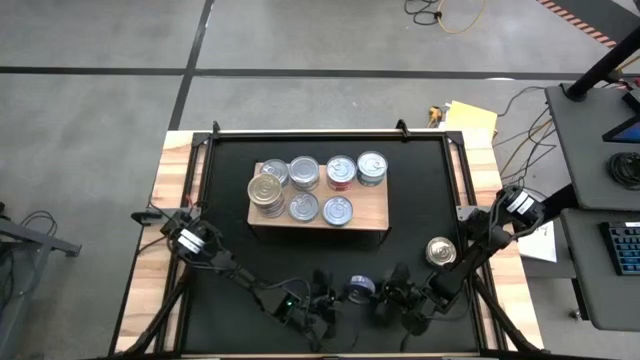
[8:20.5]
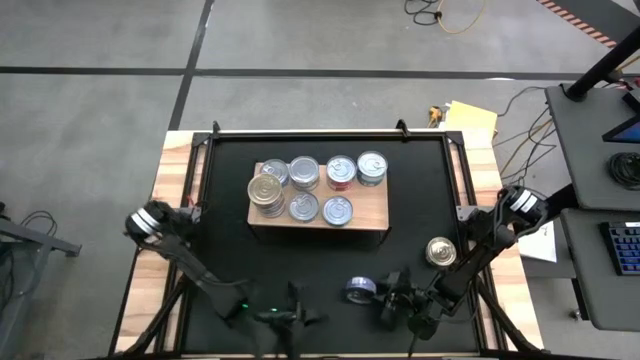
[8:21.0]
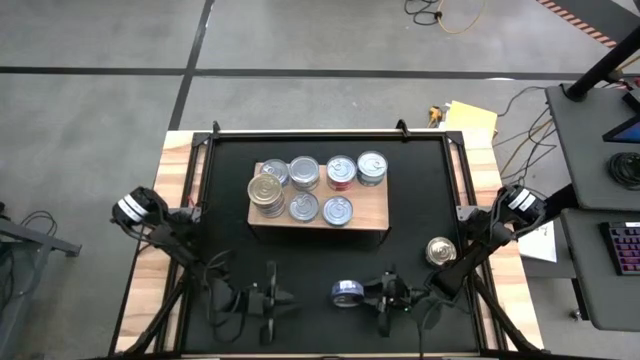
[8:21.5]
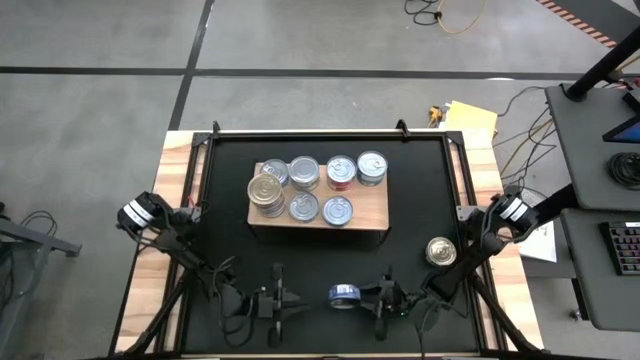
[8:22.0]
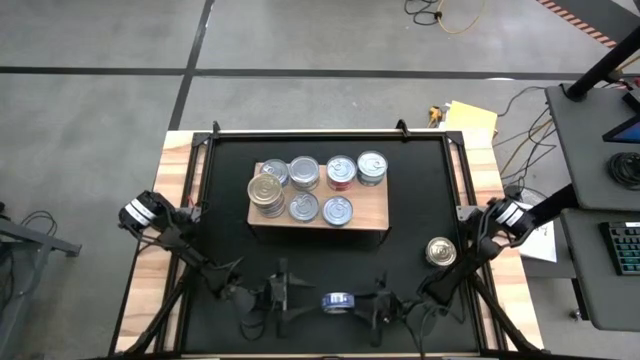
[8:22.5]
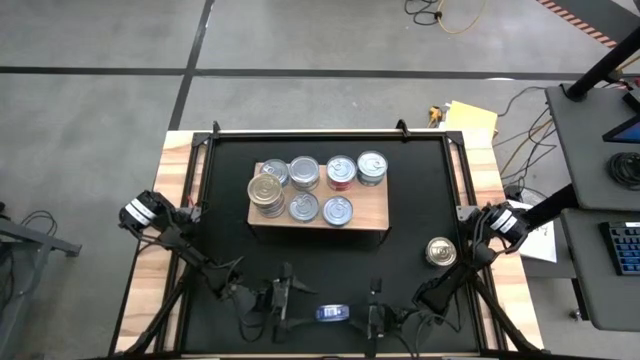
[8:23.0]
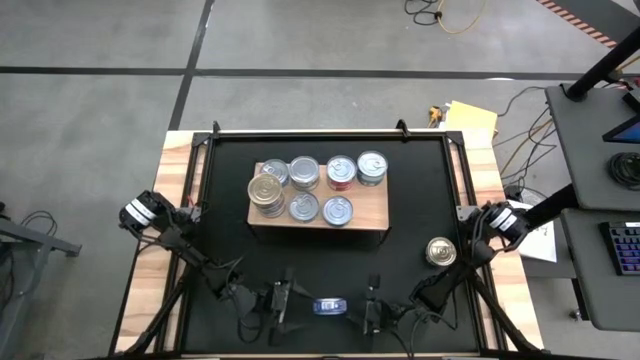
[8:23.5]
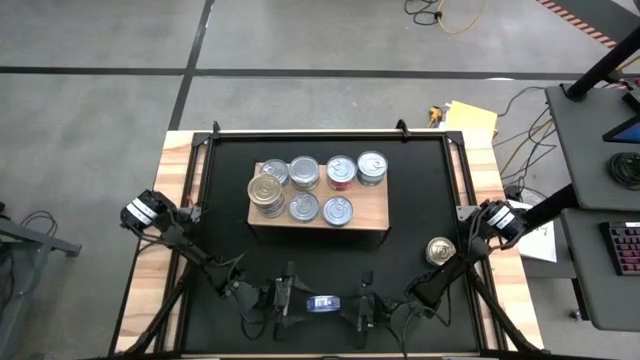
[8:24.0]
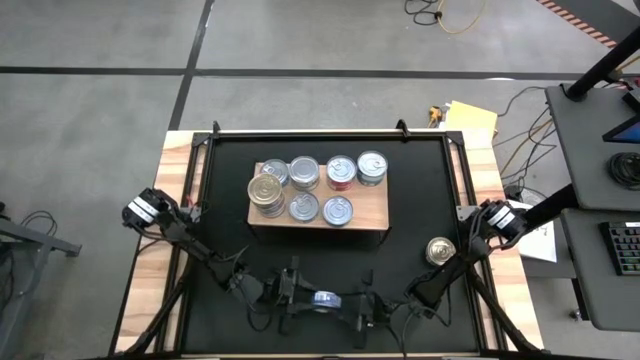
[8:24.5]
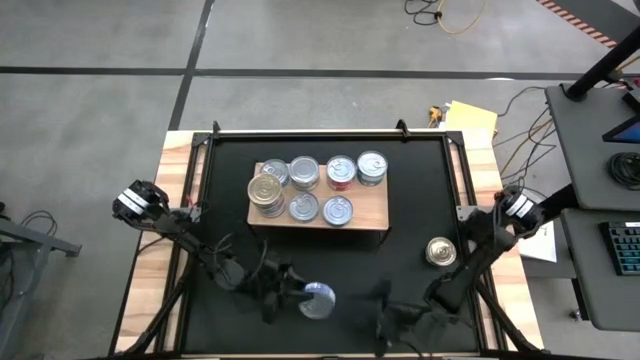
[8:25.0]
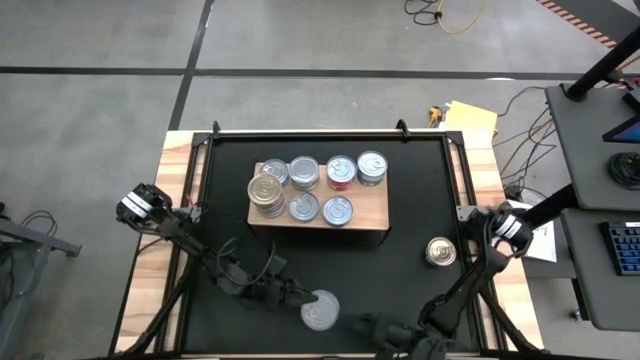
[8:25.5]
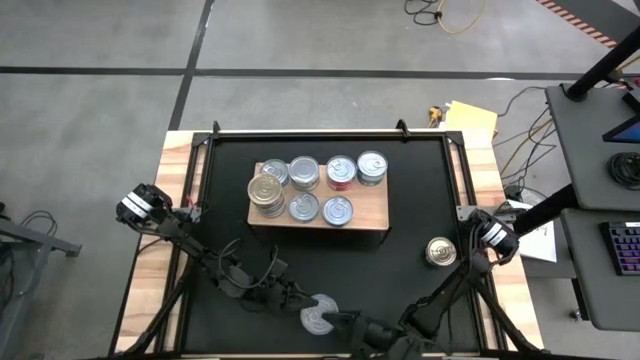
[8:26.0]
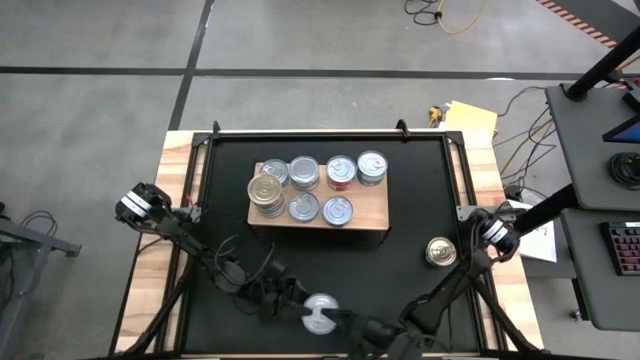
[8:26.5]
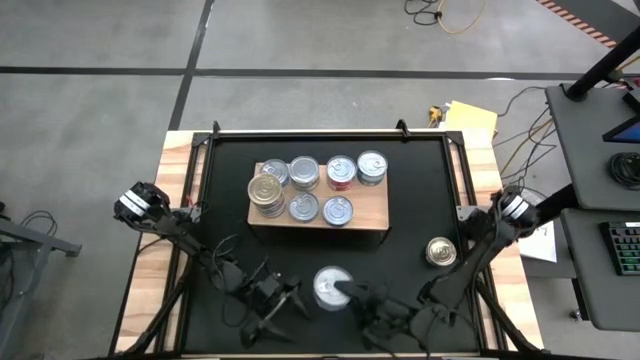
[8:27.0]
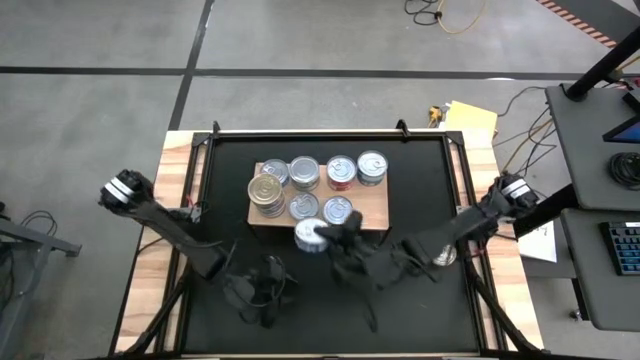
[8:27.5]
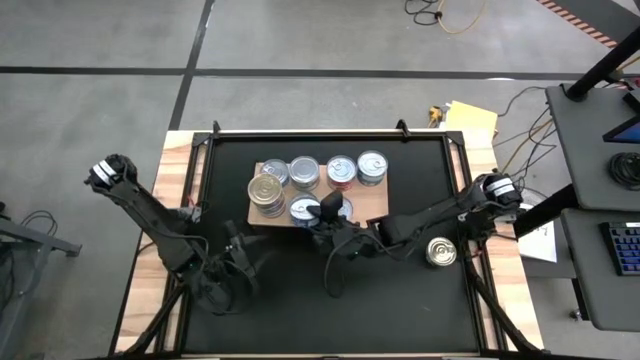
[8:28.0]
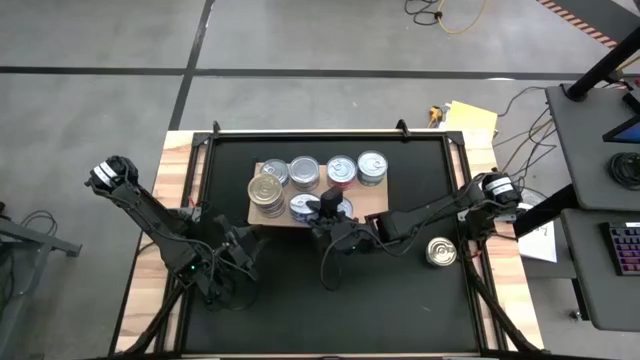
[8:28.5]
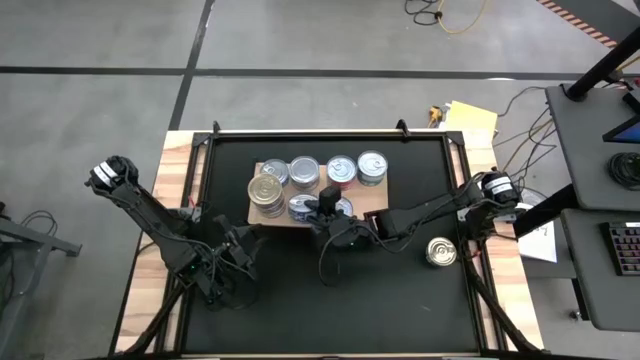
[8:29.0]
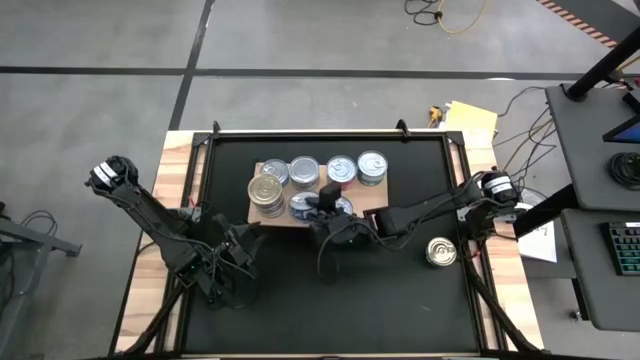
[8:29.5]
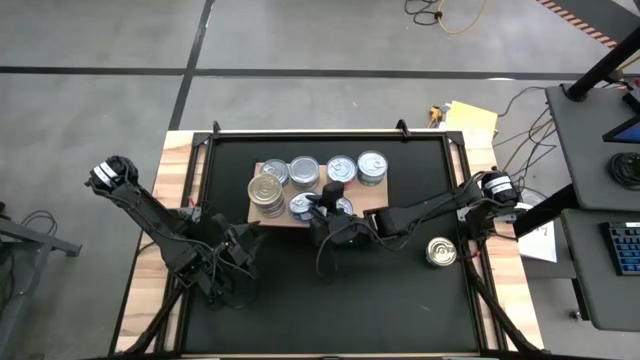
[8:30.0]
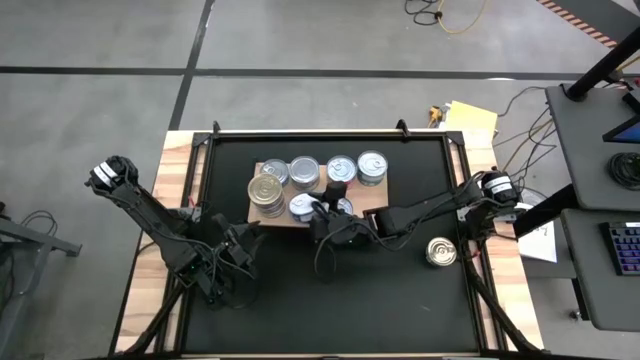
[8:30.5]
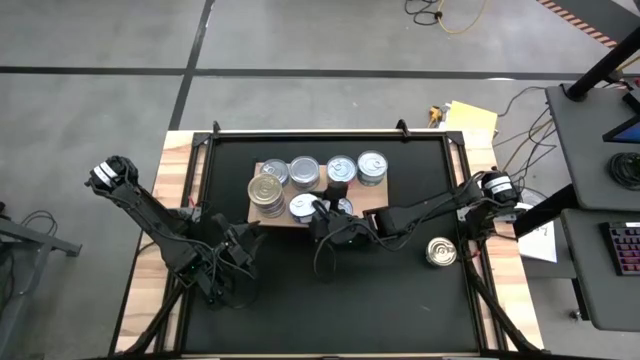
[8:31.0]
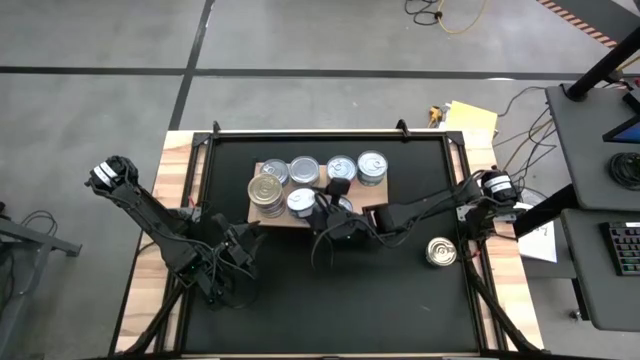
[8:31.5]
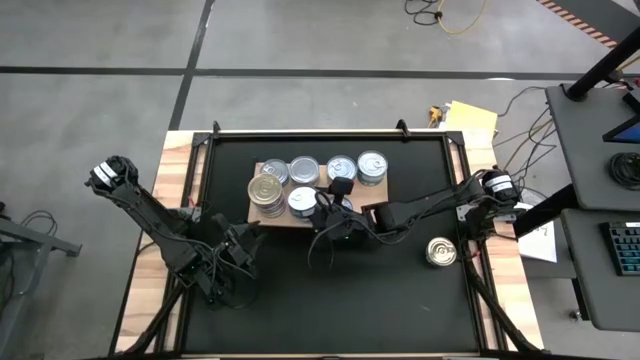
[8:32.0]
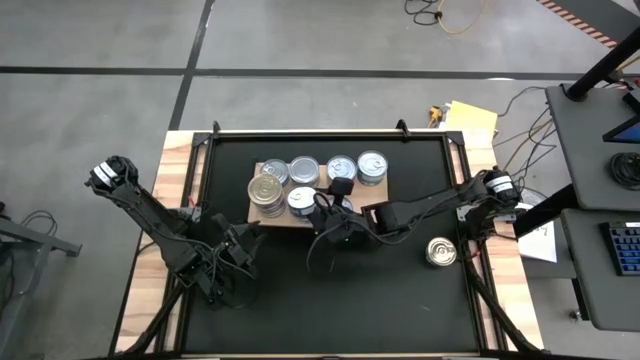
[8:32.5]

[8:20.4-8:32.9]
Task: Stack canned seafood by type on shelf
Stack the dark blue tuna can on the dark blue tuna can

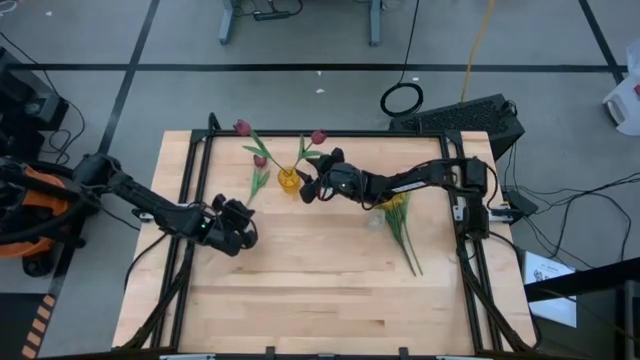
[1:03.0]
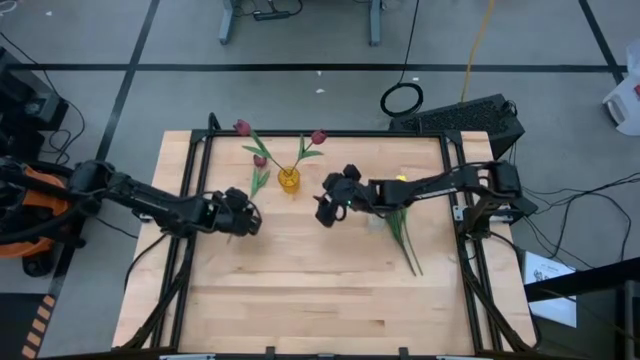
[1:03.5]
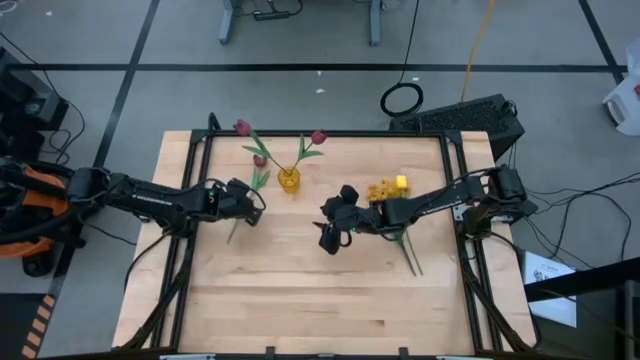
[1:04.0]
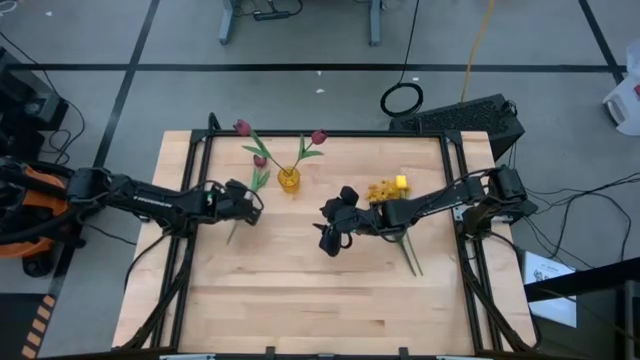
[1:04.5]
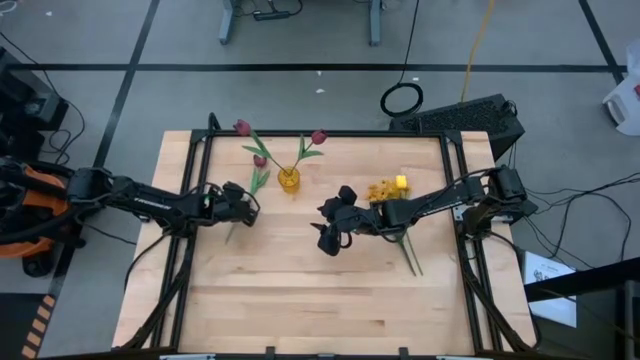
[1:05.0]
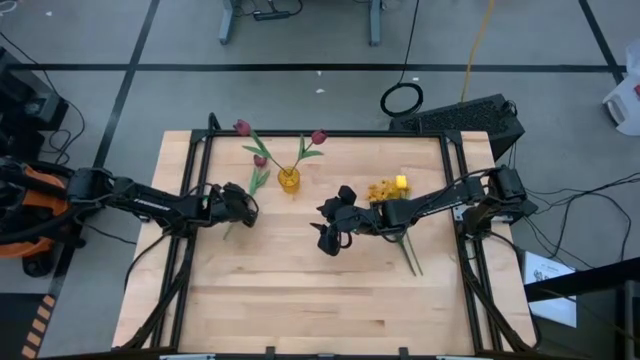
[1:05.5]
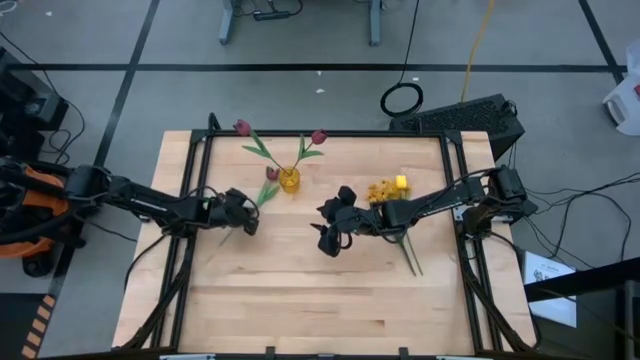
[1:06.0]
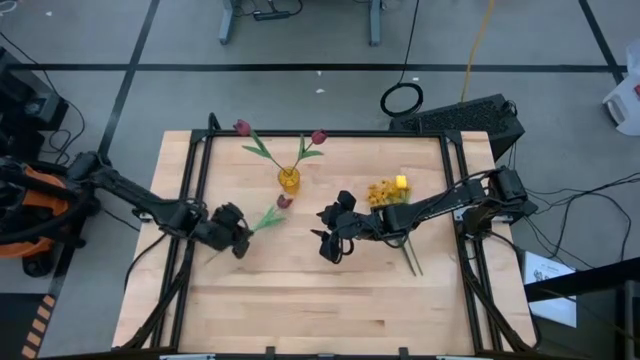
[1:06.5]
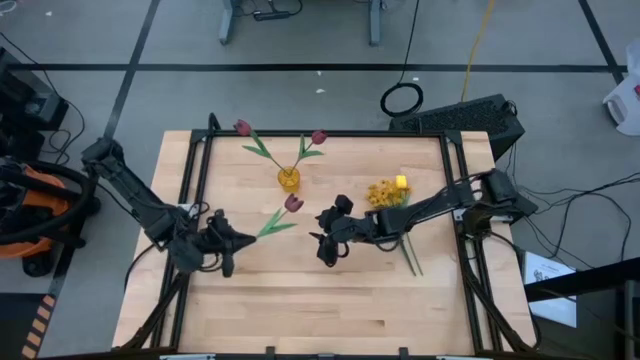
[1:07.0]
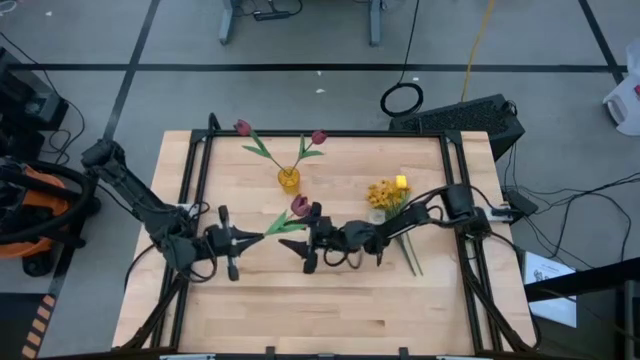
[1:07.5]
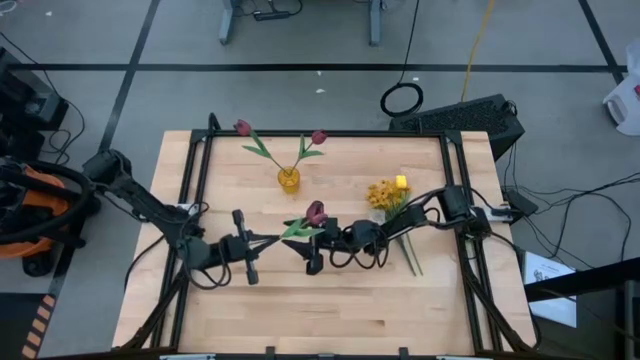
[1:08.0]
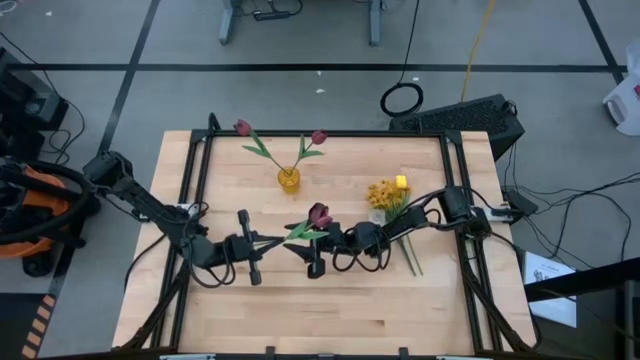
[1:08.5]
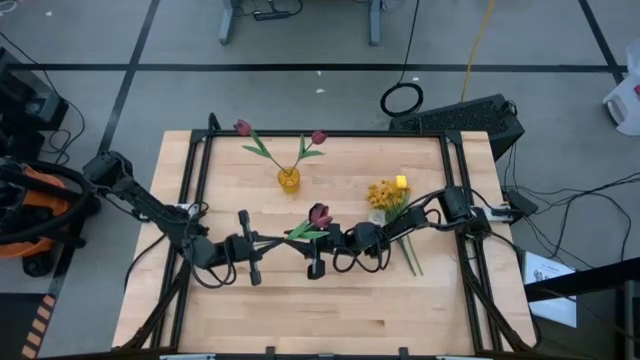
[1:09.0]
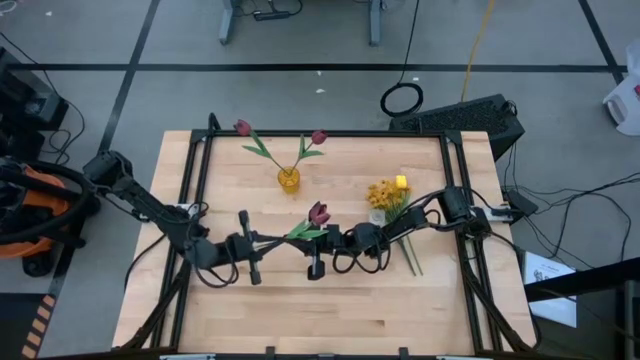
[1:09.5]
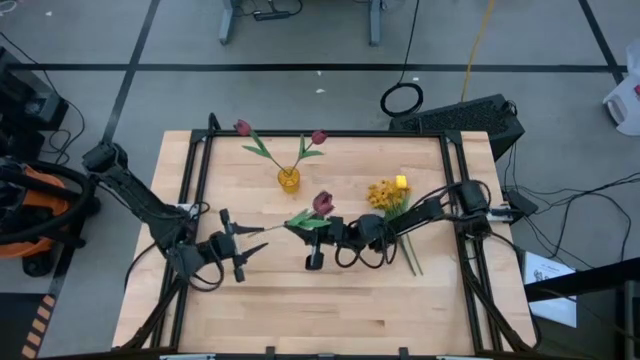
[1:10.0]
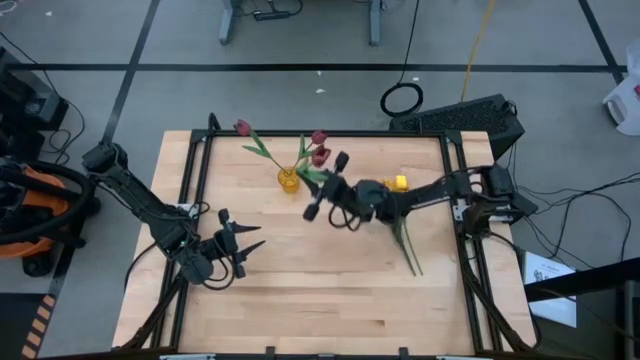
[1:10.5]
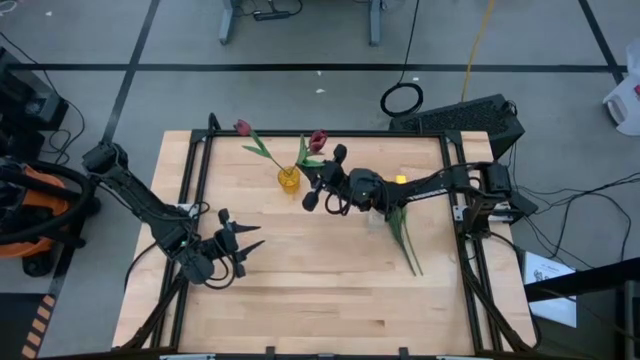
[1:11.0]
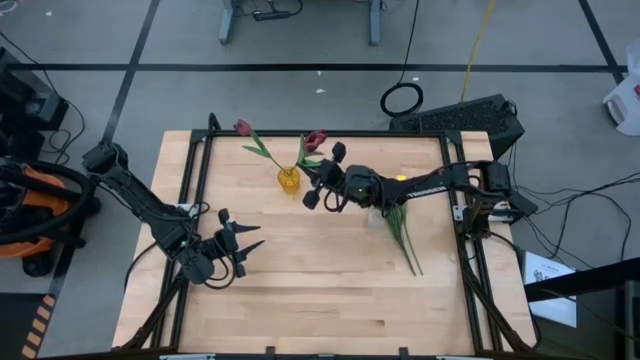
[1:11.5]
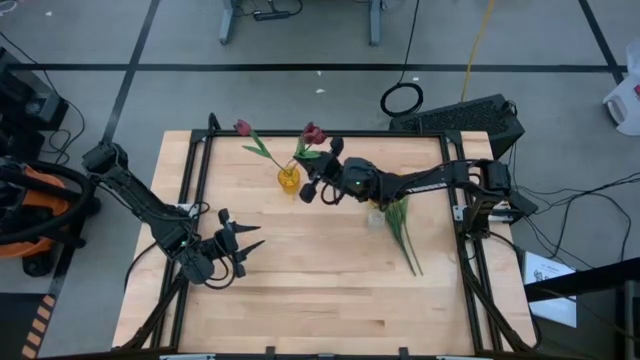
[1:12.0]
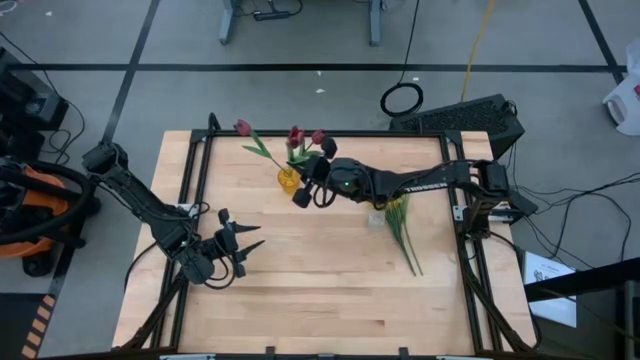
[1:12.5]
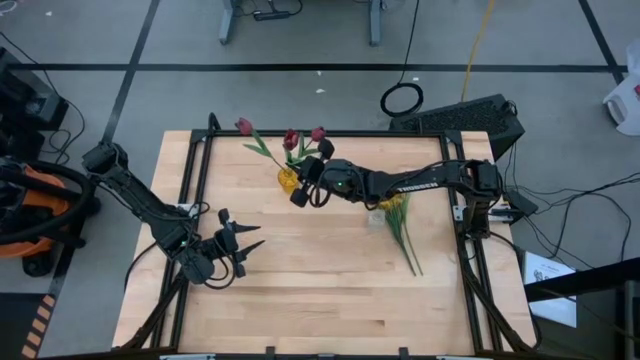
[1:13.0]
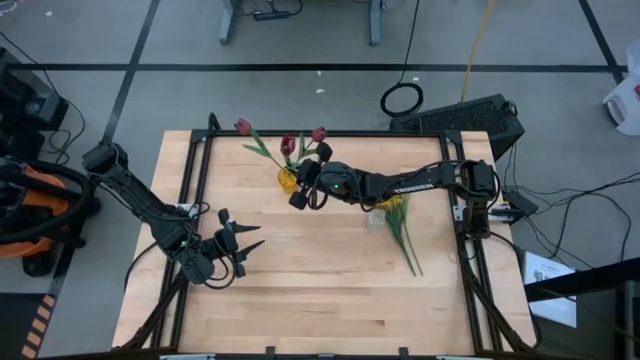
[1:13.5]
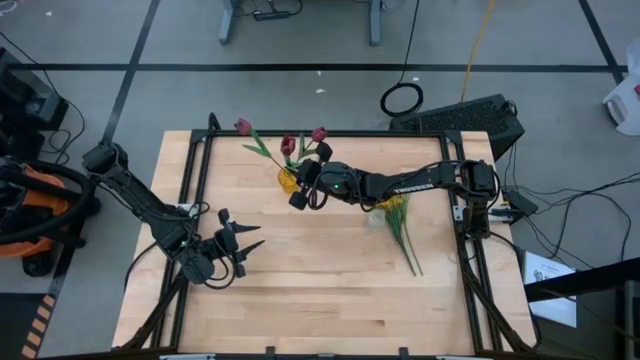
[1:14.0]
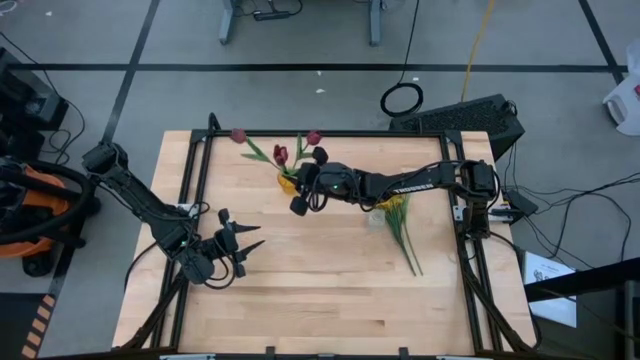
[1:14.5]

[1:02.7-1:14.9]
Task: Sort flowers into vase by color
Put the red flower into the yellow vase
